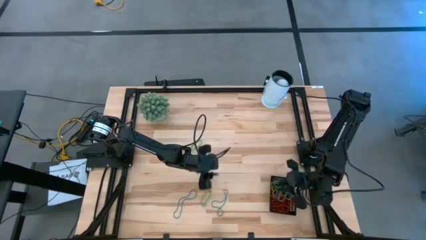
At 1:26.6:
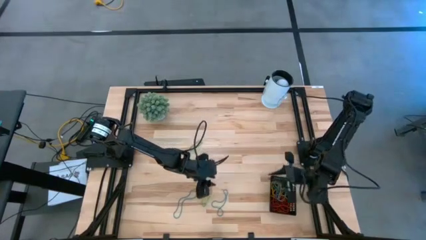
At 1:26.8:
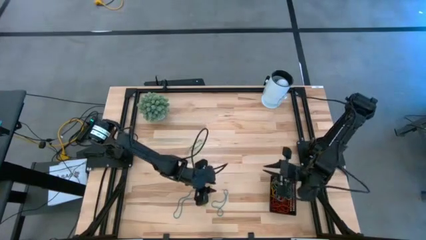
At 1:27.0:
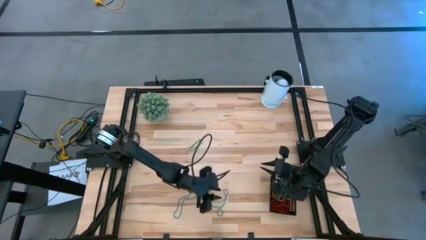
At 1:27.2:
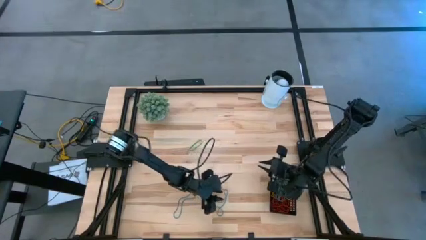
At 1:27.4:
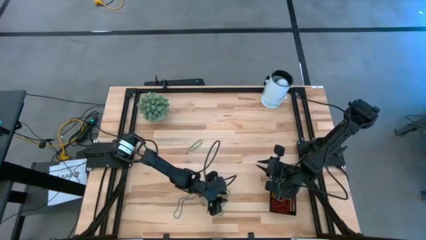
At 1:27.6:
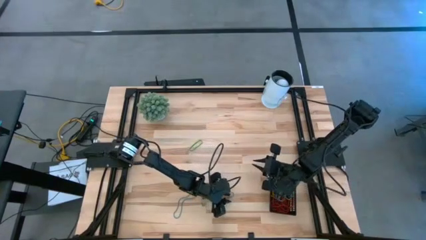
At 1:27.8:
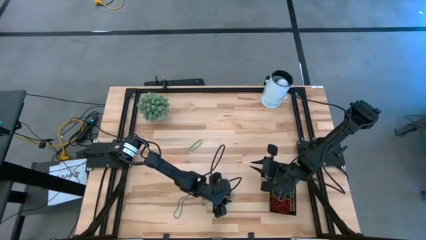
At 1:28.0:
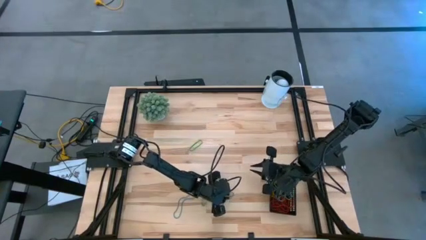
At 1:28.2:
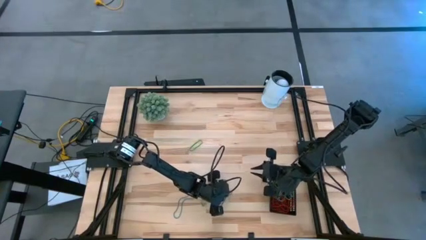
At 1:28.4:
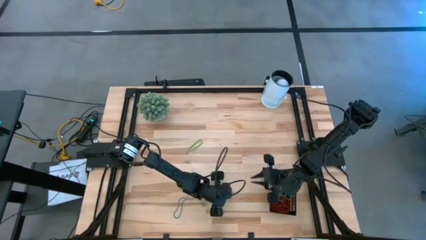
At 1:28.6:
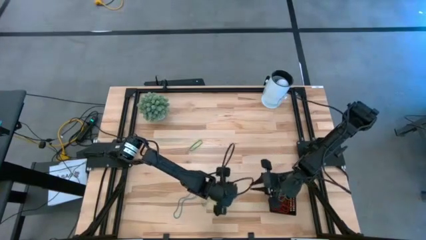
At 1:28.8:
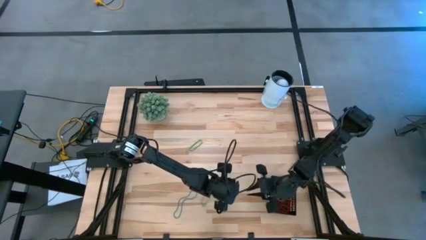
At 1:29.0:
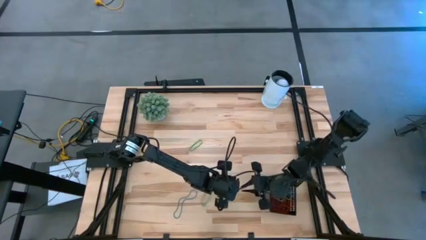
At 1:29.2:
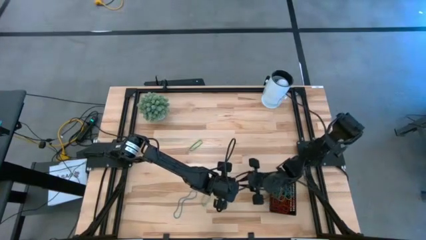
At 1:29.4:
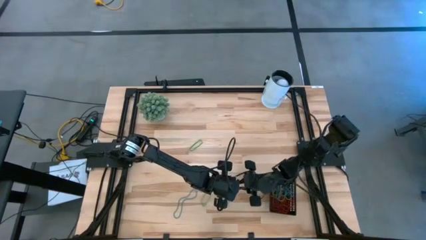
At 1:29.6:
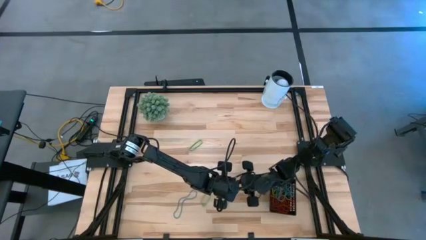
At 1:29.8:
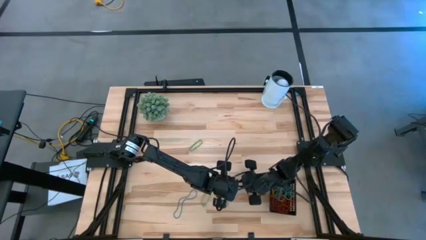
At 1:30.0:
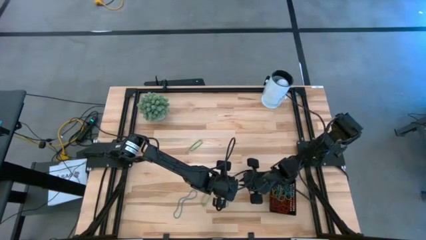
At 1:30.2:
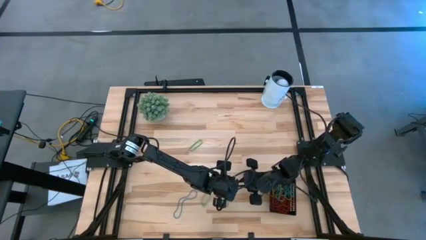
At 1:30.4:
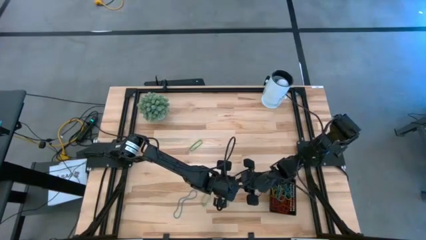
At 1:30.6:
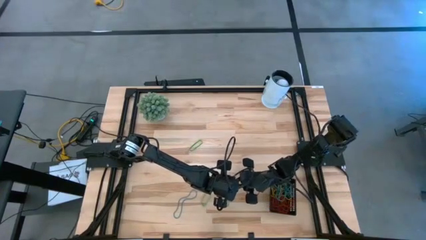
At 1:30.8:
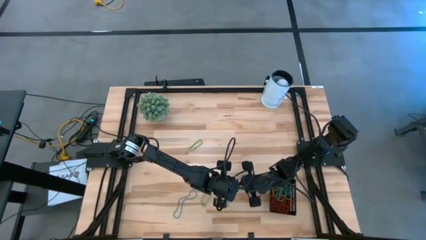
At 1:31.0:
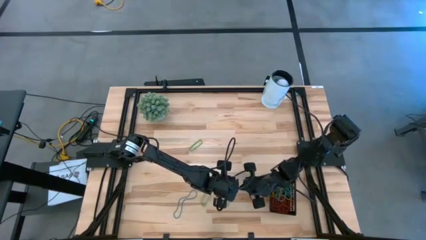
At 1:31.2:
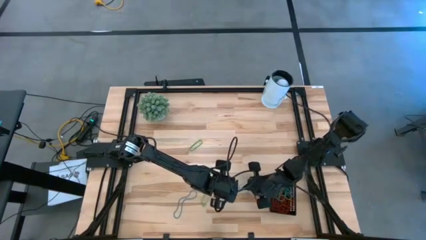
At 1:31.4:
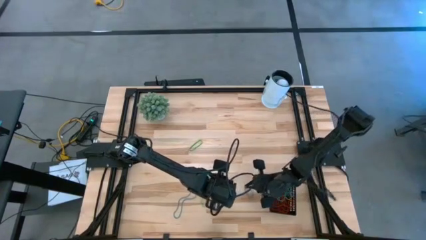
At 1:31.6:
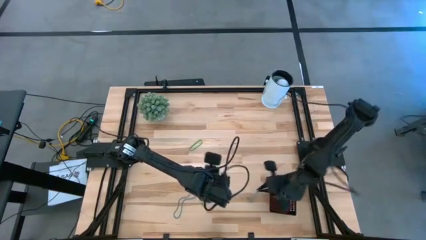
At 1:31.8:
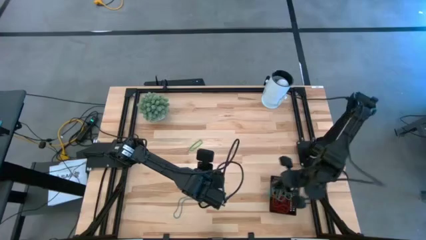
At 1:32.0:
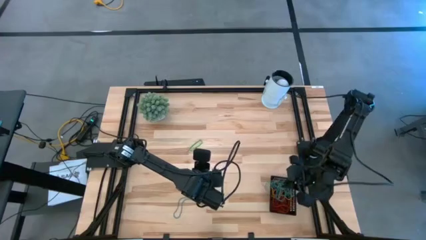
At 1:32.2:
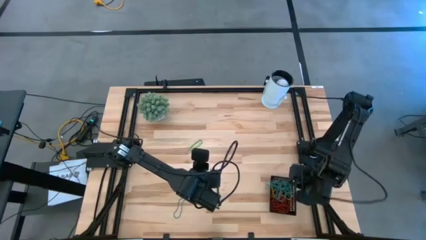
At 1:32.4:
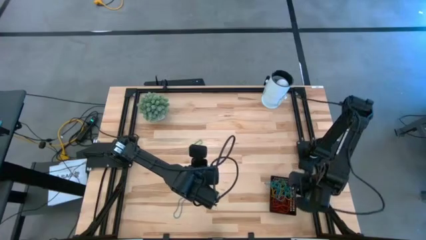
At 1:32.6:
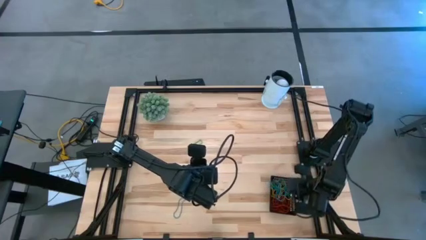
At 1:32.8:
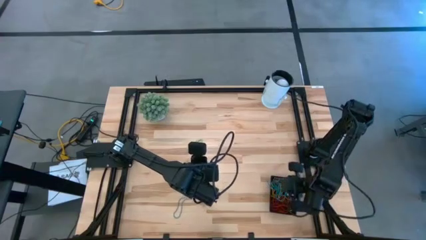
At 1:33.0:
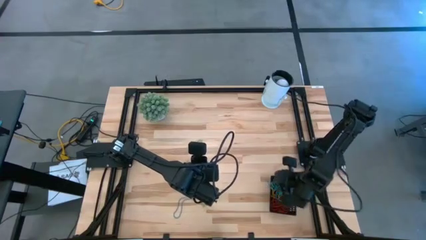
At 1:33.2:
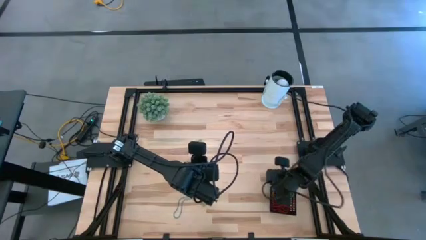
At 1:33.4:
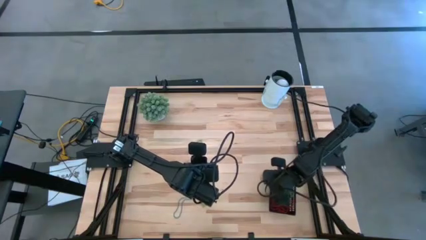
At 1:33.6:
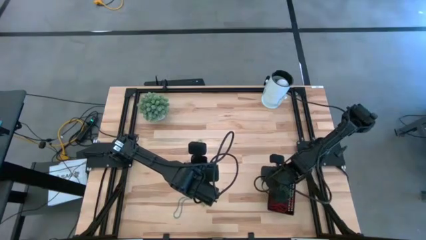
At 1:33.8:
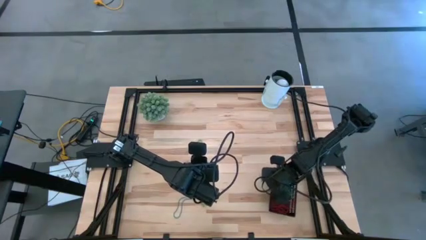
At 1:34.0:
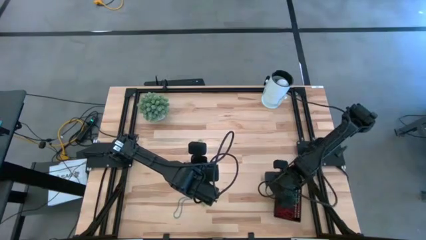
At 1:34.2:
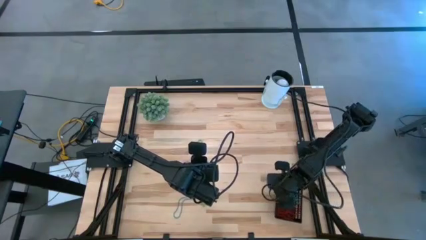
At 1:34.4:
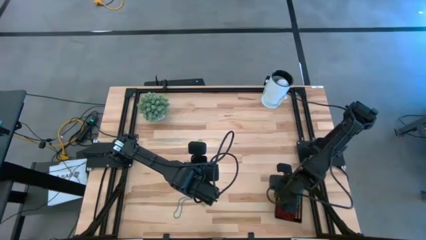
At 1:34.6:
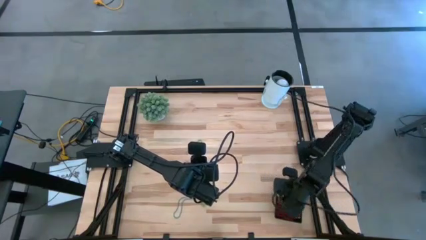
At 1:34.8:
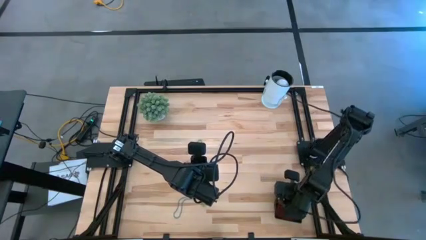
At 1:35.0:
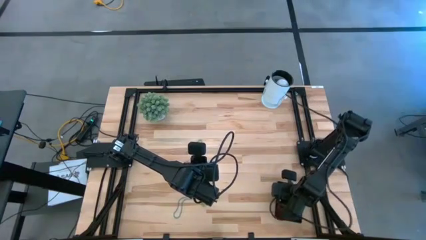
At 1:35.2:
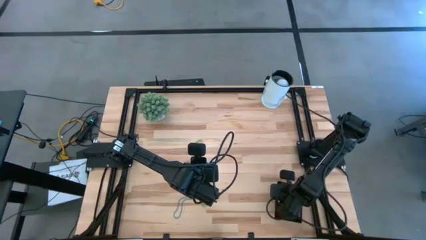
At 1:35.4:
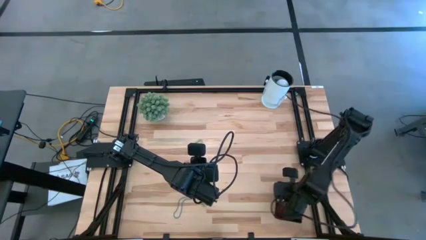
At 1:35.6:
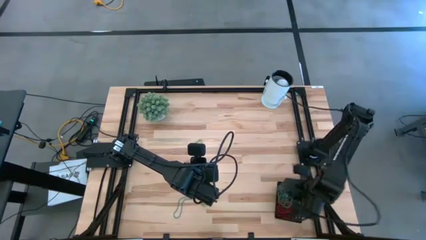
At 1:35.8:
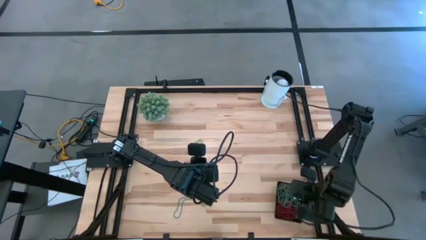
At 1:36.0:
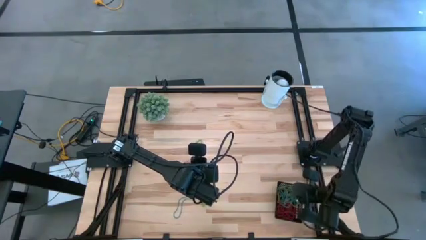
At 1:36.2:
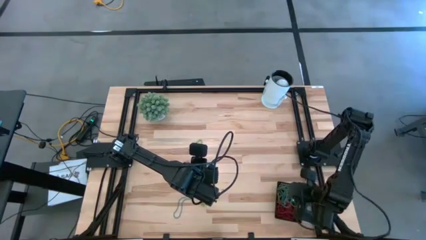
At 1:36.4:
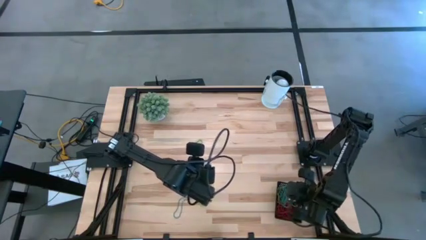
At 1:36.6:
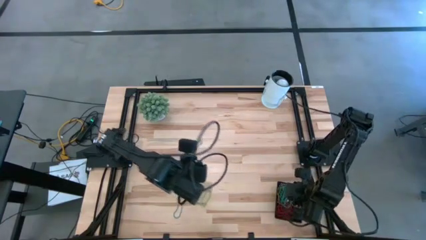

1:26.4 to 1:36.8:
Task: Pick and place items into bin
Put the bottom right blue rubberband into the black basket

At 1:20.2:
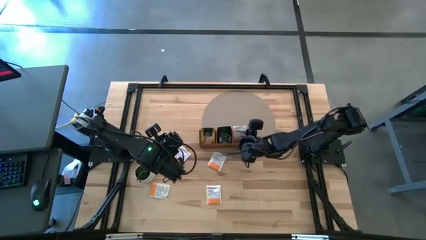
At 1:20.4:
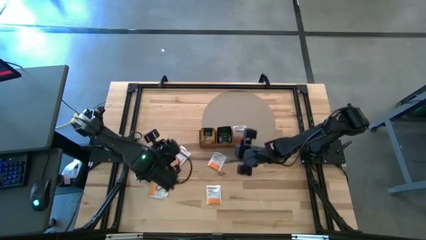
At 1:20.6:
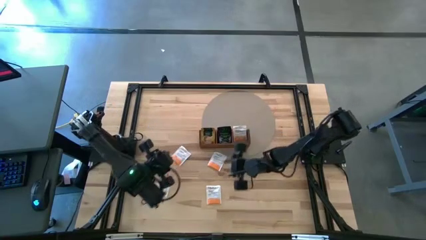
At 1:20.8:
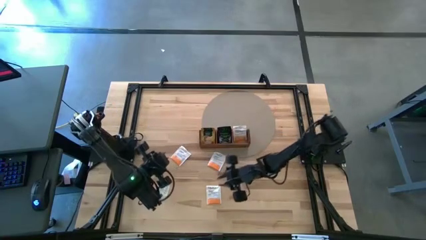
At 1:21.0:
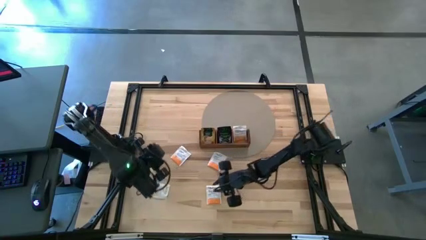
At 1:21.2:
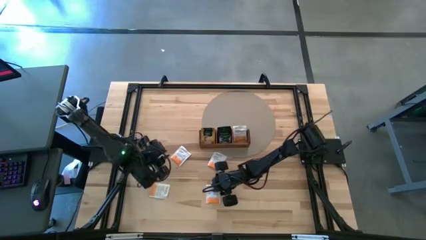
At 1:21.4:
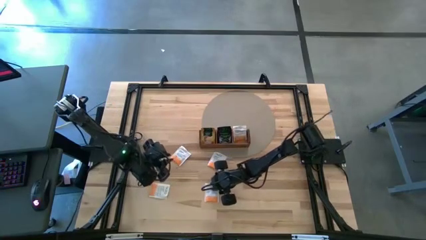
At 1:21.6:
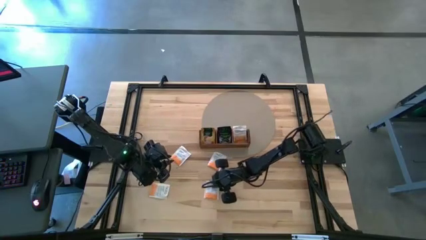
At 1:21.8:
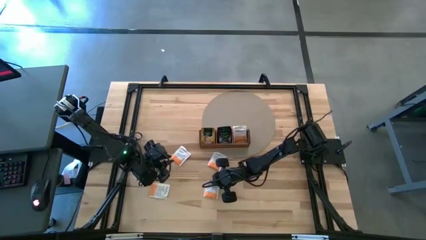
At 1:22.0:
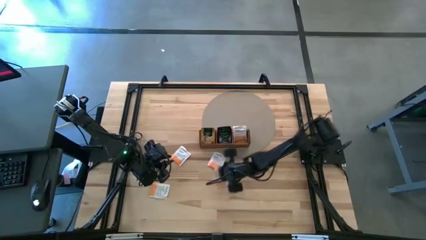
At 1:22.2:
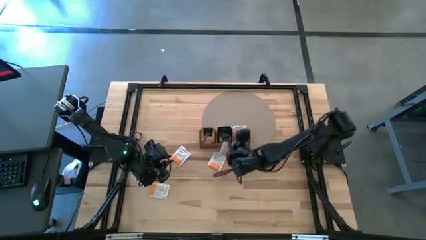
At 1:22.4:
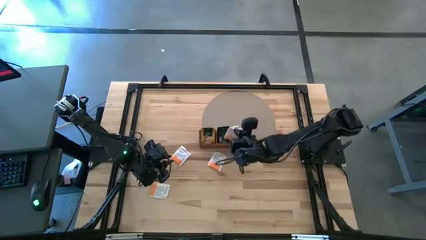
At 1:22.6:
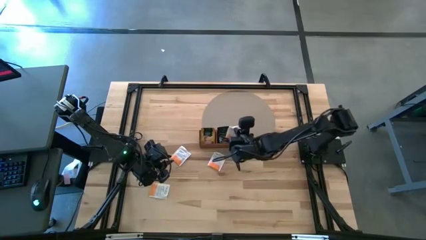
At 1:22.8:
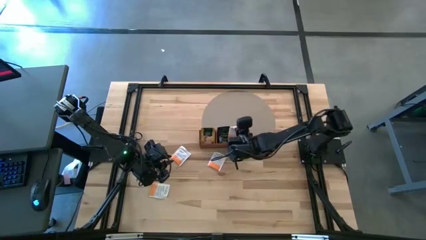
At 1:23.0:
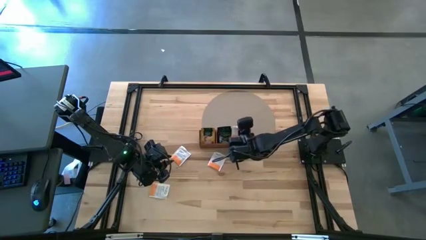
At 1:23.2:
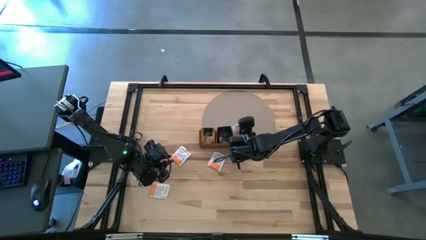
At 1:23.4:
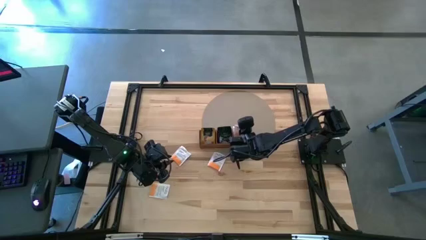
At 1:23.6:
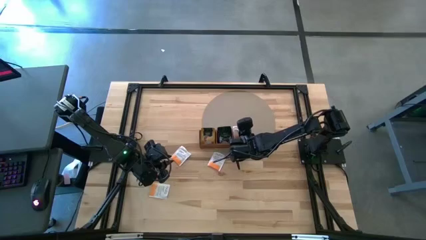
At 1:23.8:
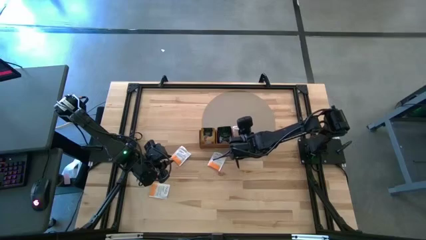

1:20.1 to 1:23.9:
Task: Pick & Place Tea
Put the white tea bag into the right section of the wooden organizer

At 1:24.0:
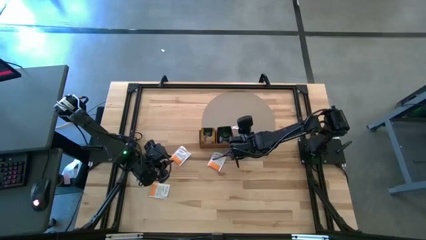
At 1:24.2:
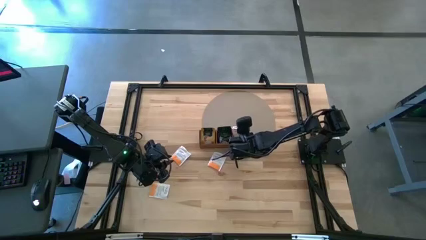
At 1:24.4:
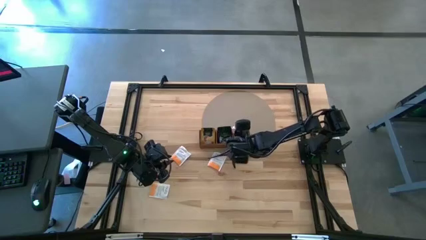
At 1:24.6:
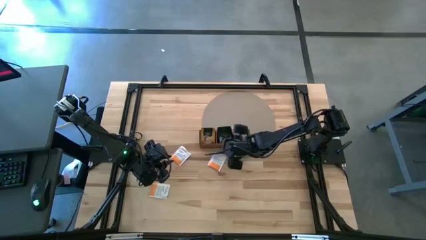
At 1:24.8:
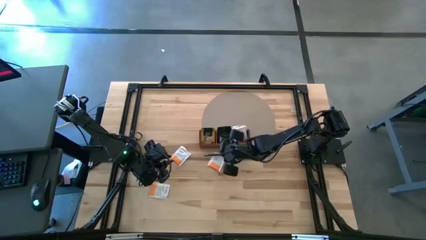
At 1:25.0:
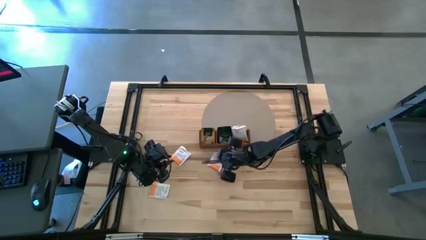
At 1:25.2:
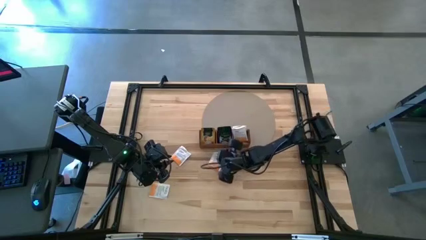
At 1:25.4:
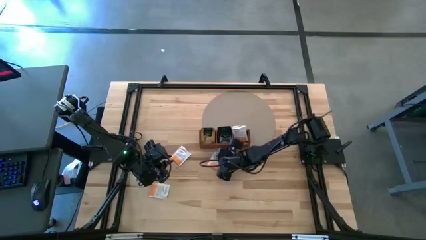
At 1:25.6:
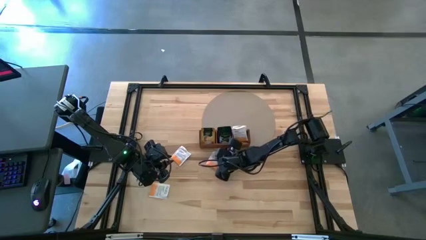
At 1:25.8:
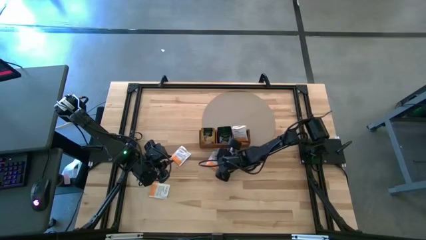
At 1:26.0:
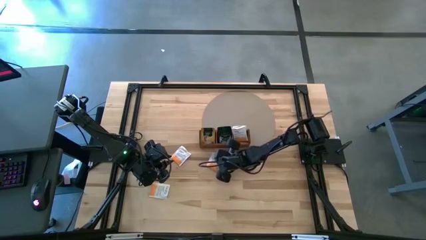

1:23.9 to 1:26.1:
Put the white tea bag into the right section of the wooden organizer
